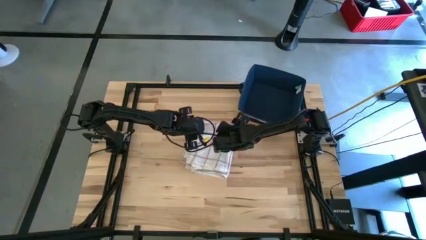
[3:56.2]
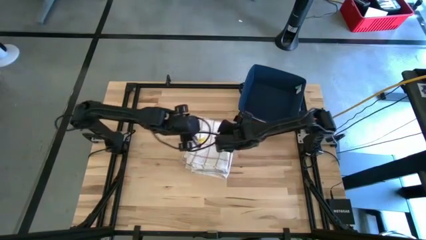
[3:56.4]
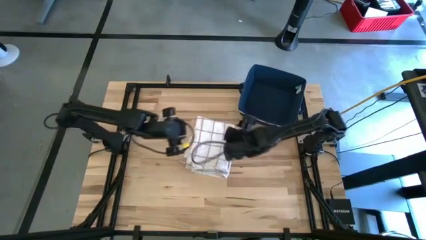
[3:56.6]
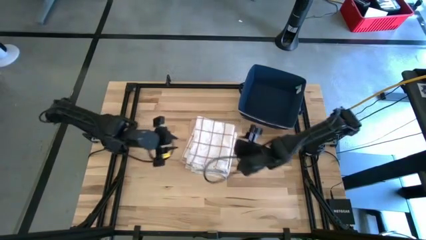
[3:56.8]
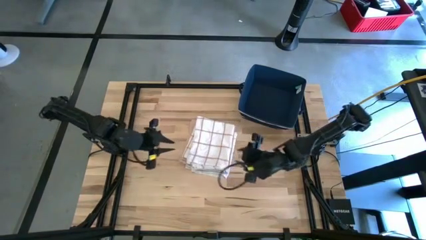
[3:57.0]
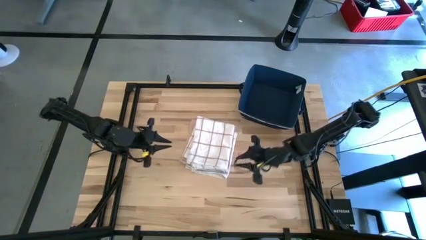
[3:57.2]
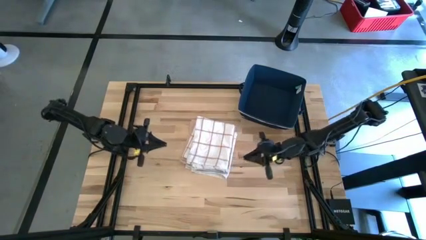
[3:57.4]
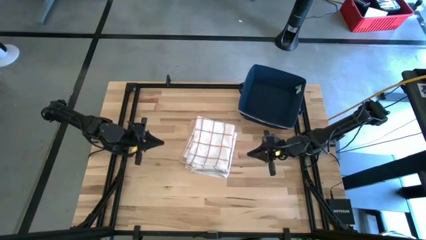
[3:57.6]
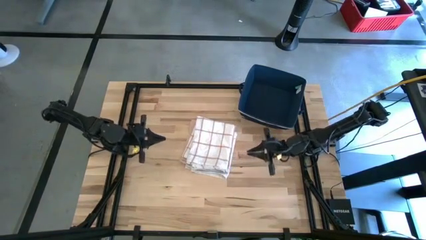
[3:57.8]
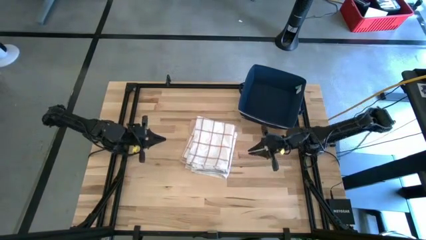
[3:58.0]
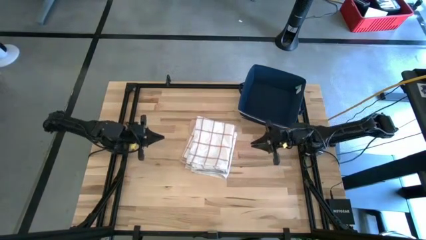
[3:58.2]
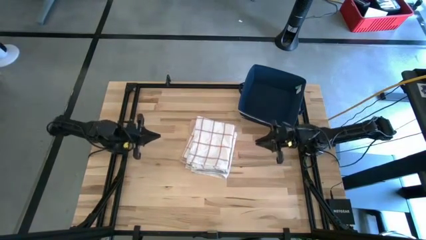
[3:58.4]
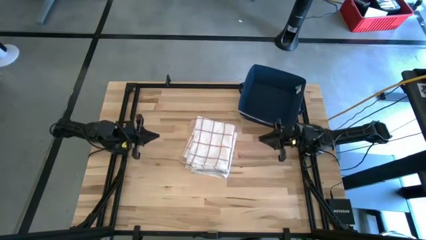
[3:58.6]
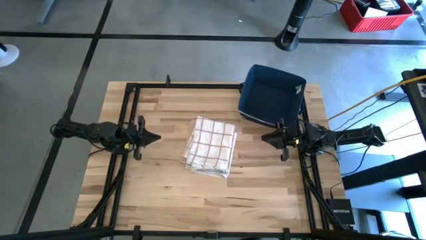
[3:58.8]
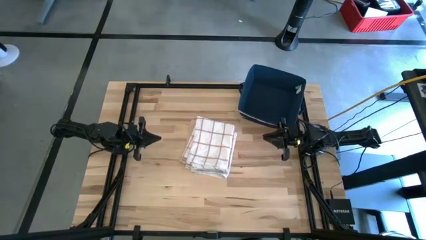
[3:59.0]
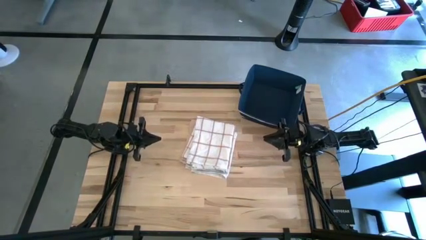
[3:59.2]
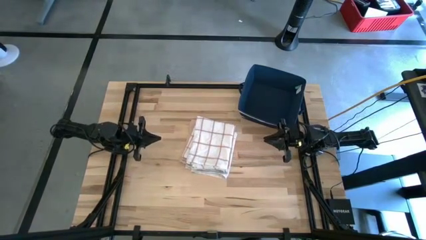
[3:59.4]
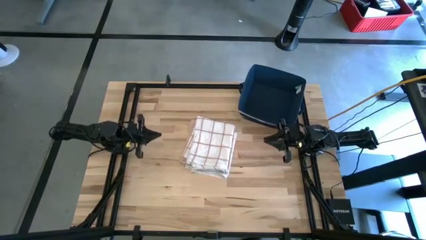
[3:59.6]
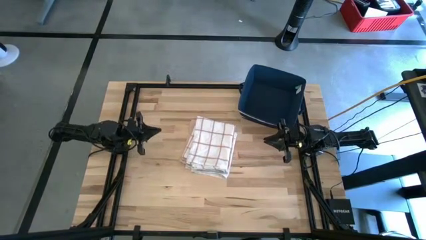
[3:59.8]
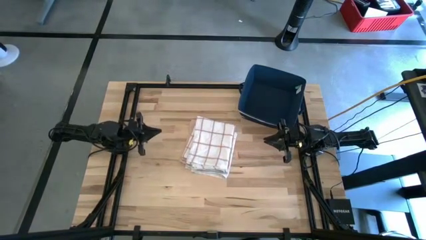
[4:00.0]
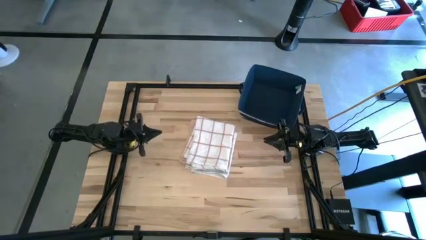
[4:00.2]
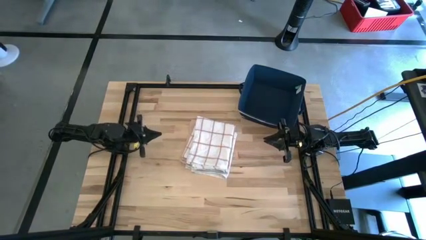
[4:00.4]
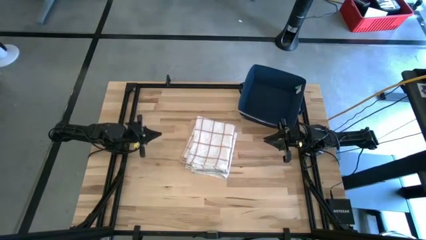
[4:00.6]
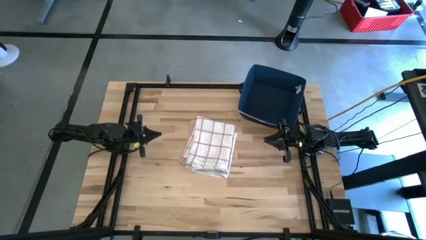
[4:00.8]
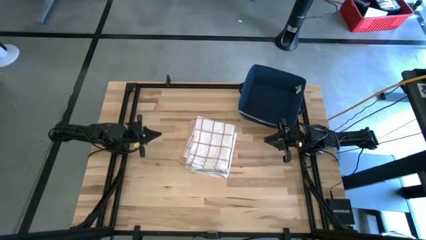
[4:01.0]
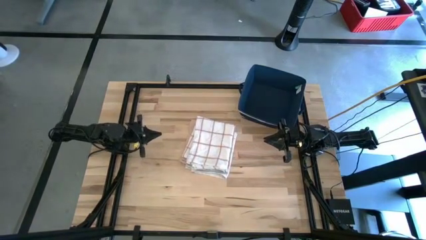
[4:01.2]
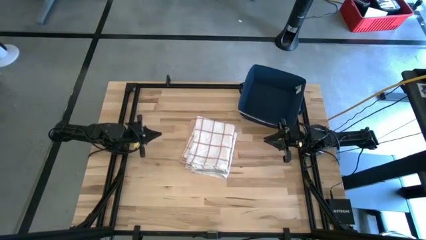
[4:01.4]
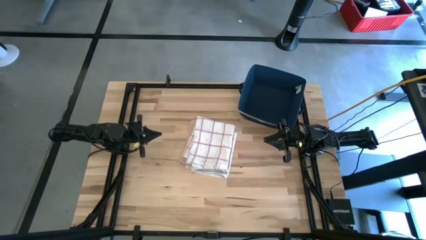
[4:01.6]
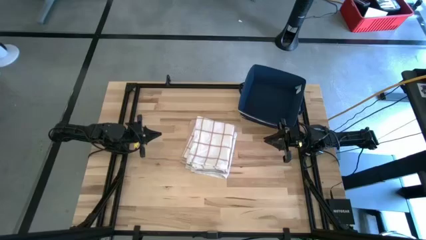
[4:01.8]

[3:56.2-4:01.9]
Task: Fold towel
Return to Home Position

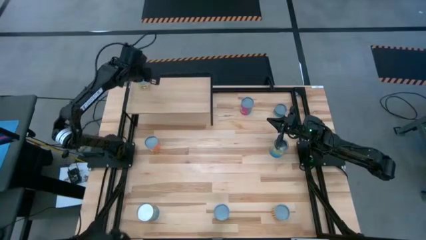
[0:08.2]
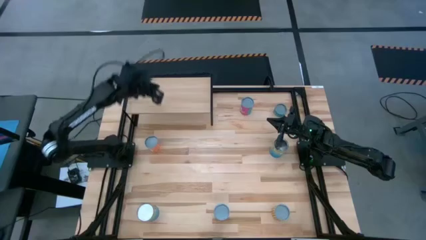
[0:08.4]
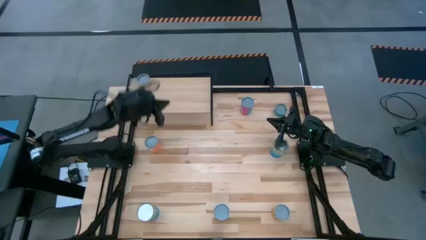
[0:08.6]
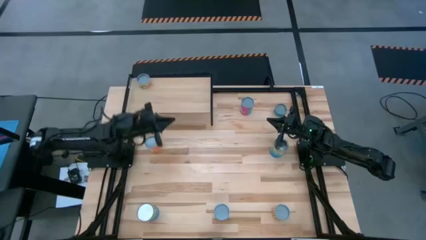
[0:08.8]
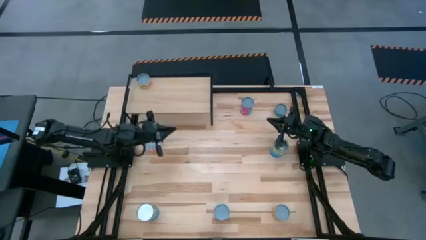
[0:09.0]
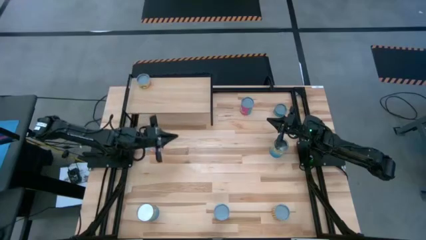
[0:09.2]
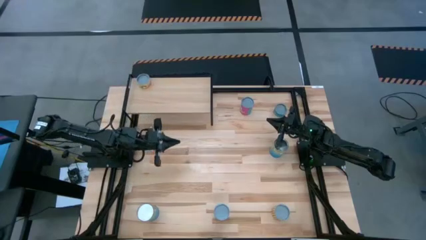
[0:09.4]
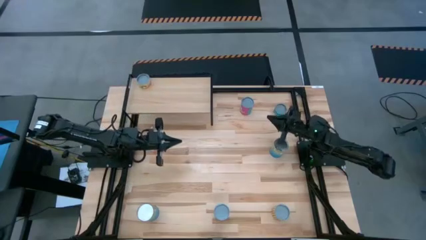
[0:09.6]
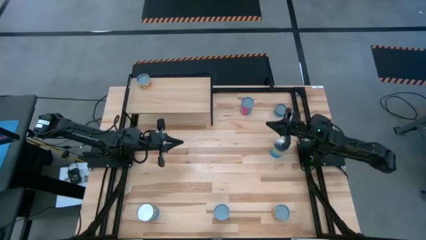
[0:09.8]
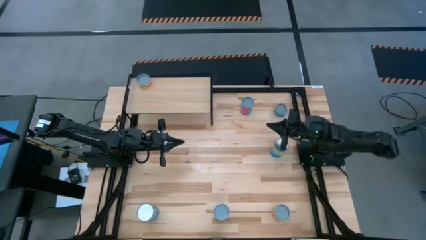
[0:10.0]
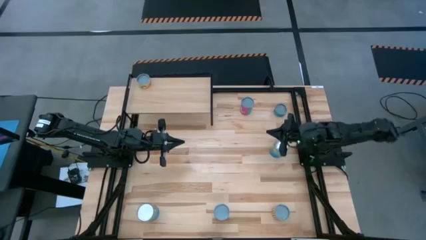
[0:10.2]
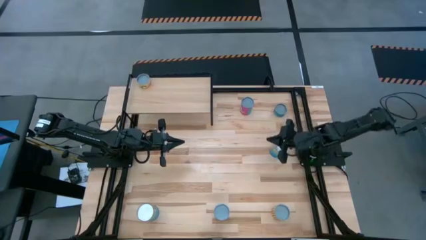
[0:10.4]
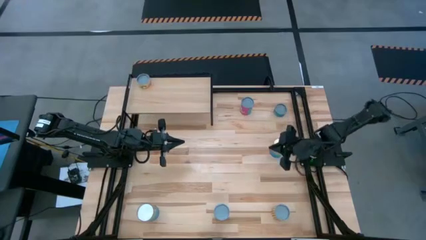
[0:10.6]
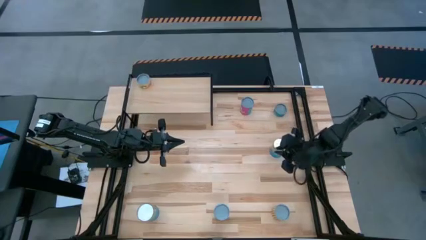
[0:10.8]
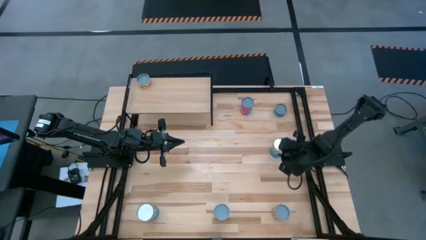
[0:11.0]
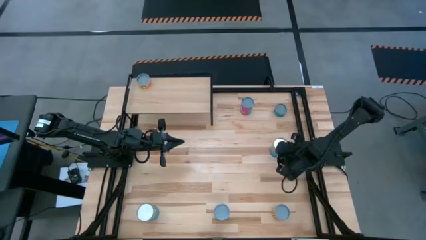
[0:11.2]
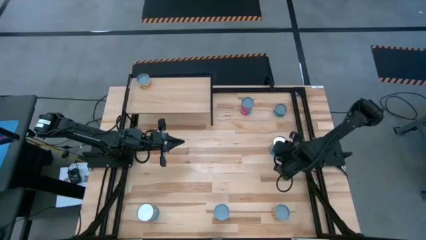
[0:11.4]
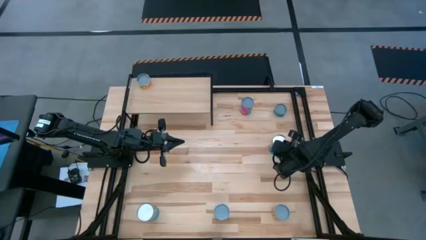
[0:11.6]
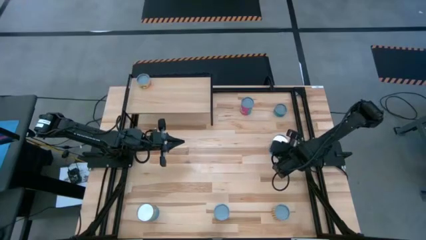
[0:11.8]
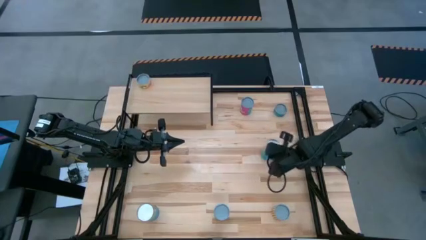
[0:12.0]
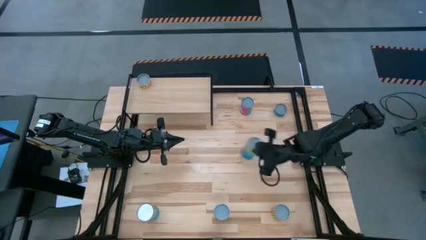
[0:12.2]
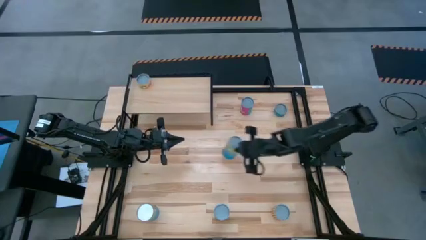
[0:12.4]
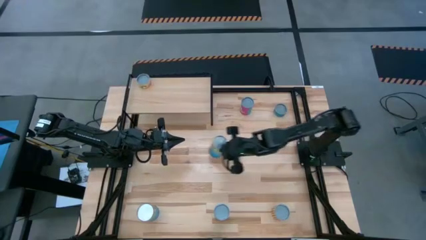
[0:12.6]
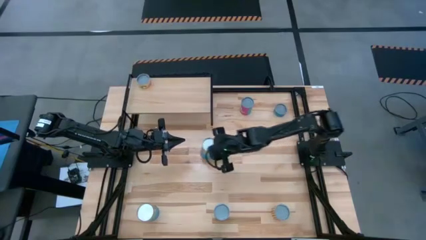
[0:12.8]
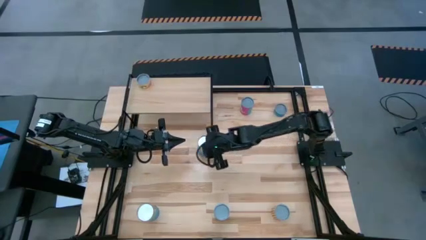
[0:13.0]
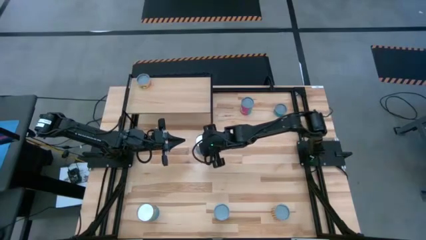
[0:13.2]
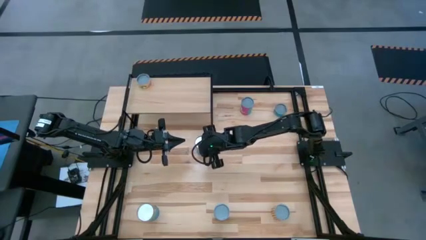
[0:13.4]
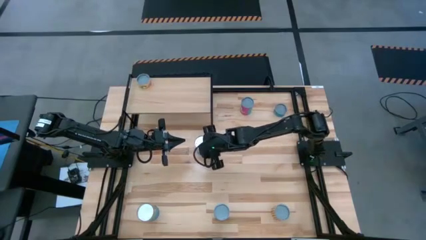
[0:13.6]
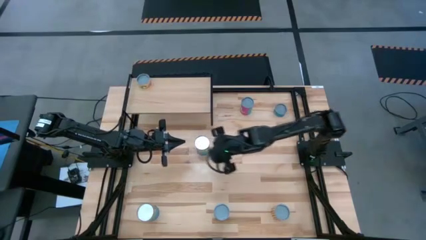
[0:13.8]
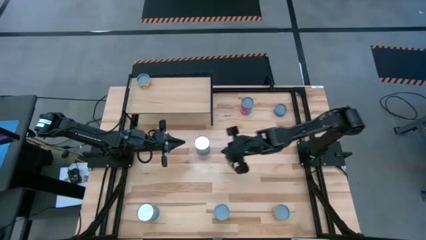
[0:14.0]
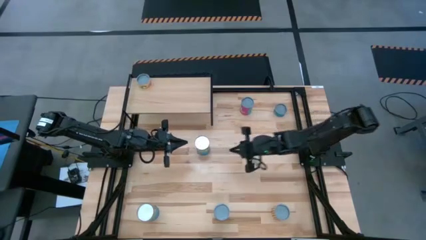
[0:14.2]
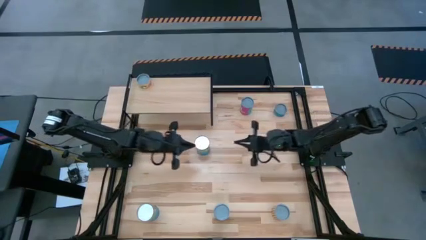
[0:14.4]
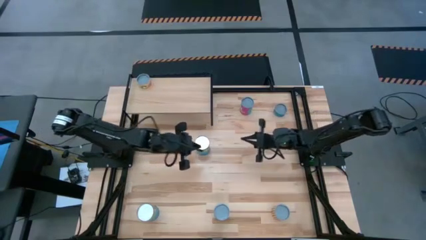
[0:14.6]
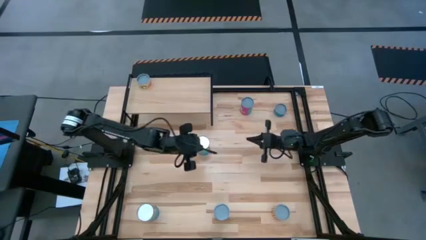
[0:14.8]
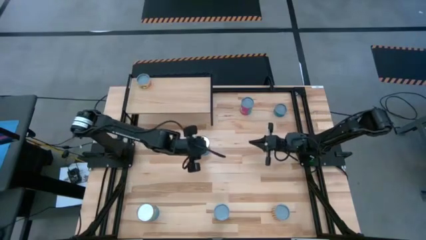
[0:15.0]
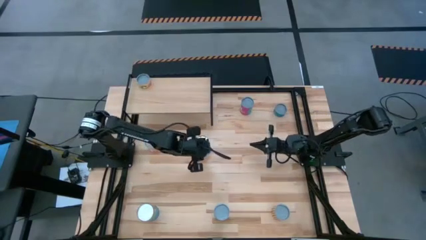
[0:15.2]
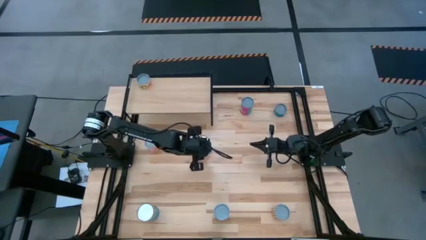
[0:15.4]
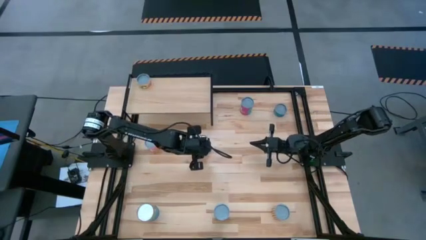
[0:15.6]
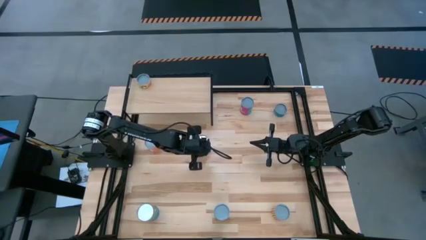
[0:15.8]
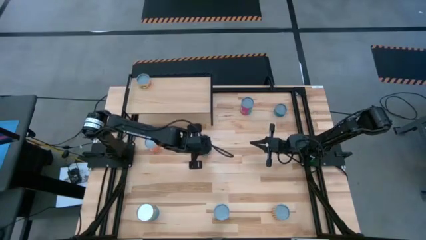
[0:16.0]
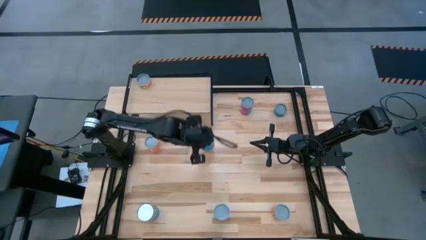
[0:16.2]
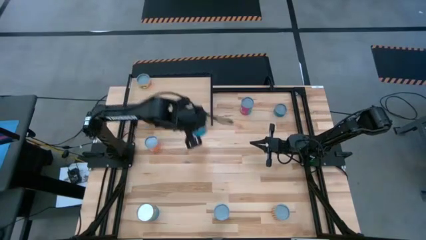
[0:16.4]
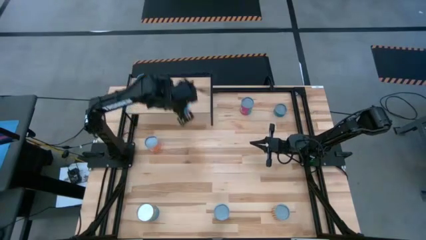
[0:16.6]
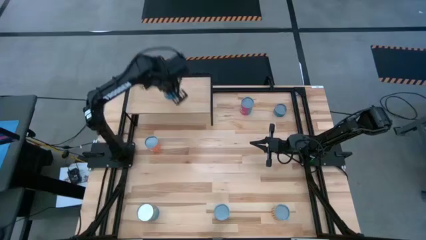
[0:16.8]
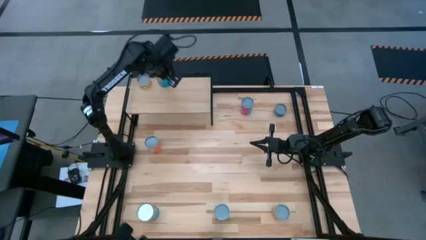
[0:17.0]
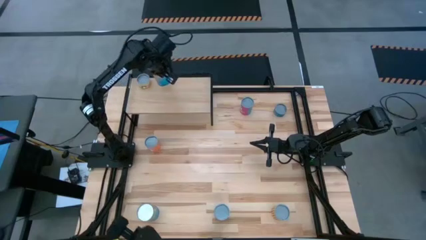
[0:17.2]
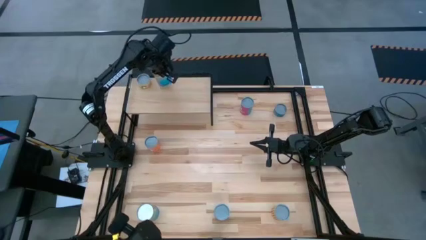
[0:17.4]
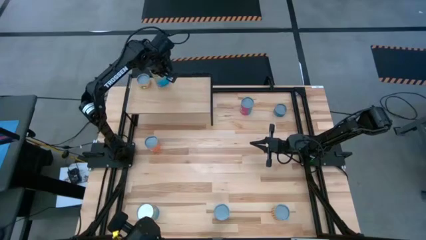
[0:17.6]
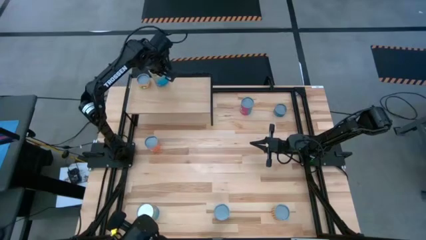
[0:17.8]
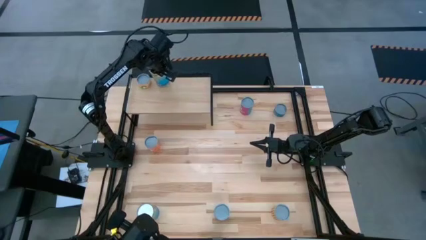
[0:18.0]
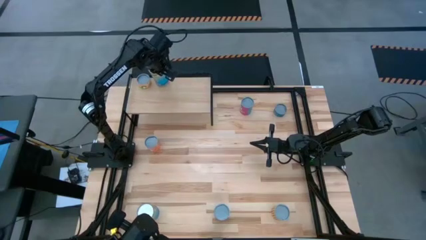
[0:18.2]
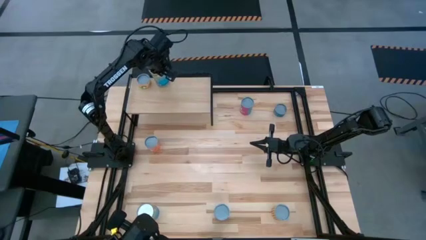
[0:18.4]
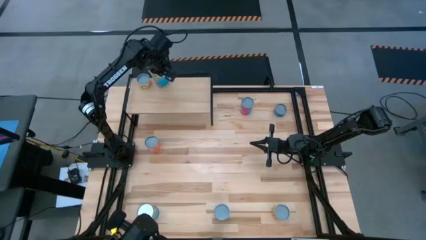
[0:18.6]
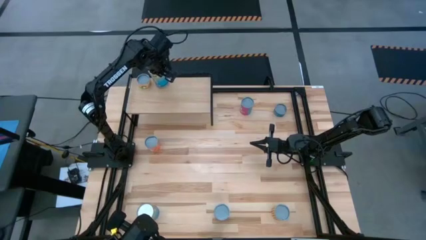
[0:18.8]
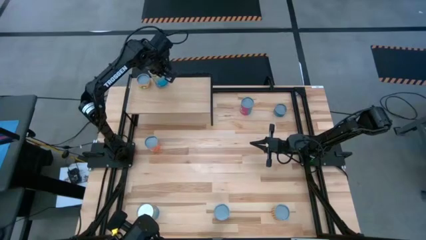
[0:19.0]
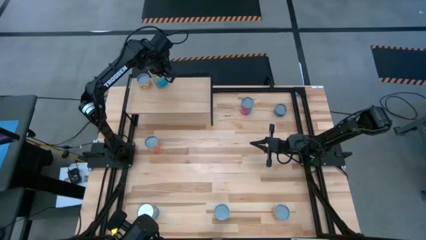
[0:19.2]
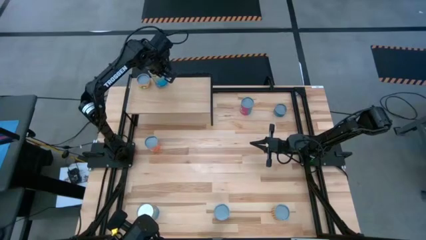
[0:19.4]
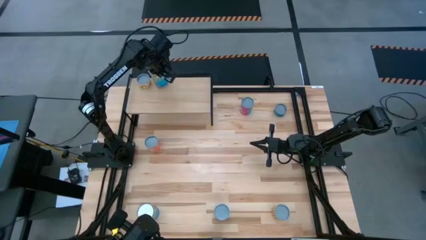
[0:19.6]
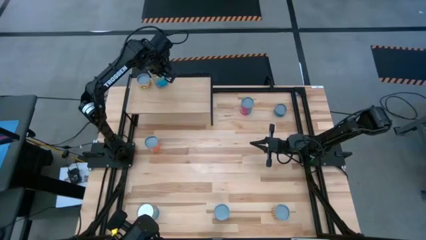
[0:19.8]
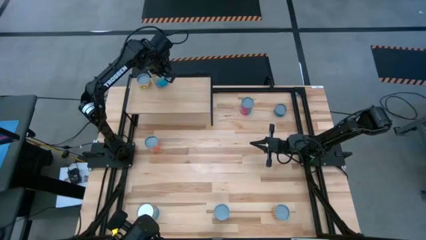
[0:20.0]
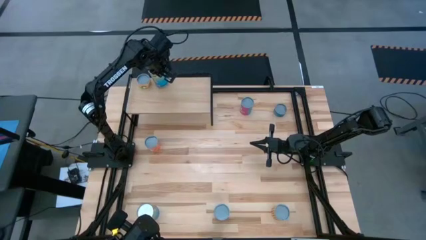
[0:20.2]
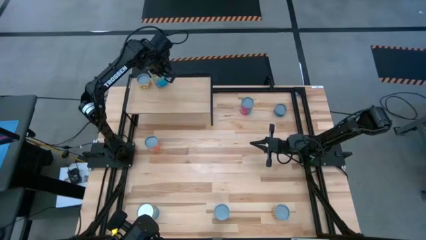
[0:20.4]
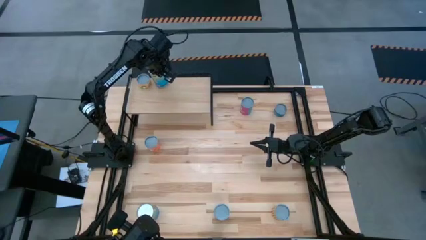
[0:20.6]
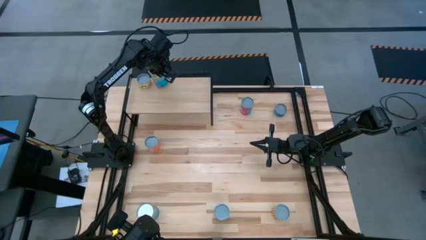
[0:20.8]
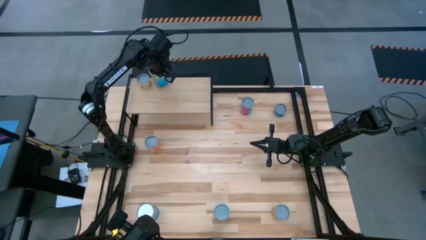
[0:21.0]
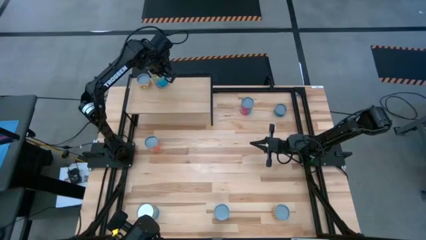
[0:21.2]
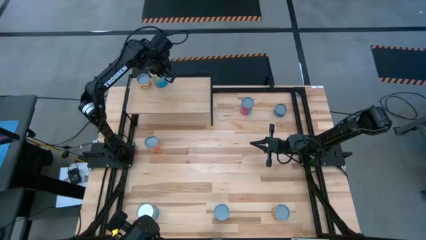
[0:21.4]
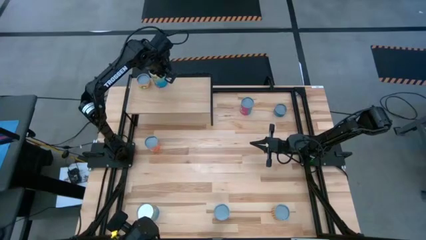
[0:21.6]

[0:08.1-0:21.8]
Task: Pick and place cans onto a shelf
Put the canned cherries on the shelf
